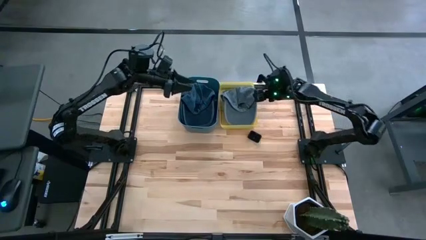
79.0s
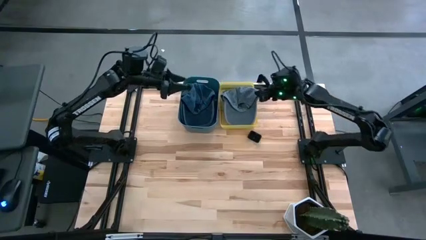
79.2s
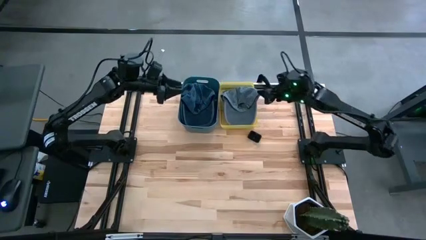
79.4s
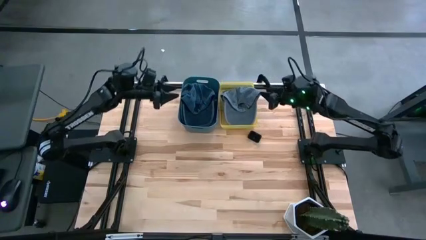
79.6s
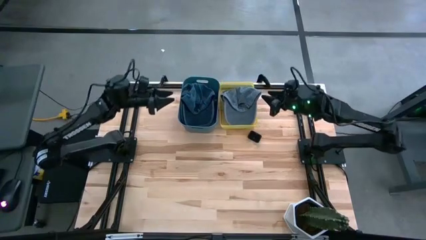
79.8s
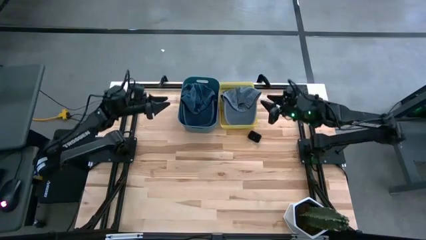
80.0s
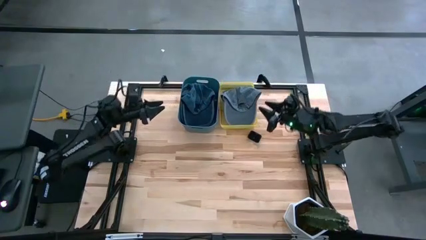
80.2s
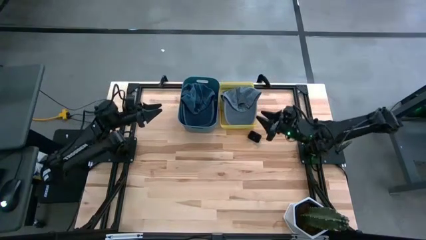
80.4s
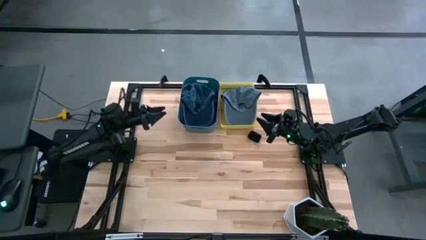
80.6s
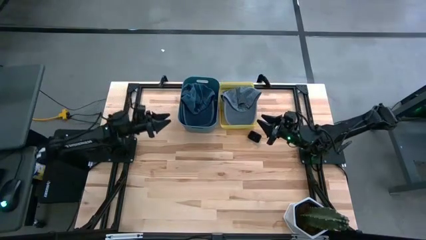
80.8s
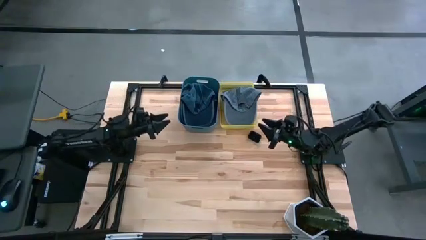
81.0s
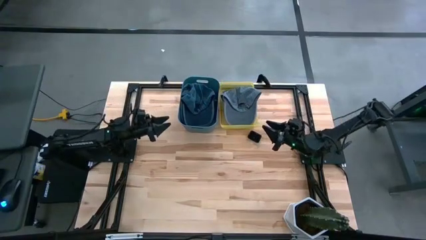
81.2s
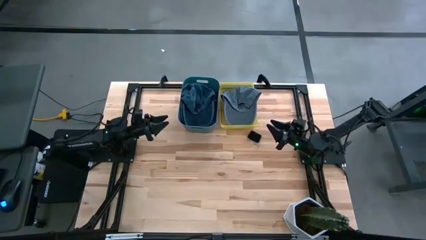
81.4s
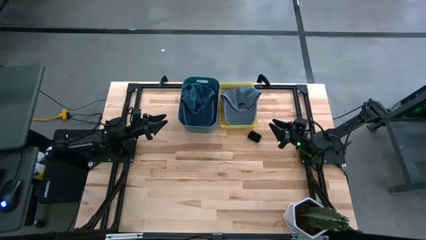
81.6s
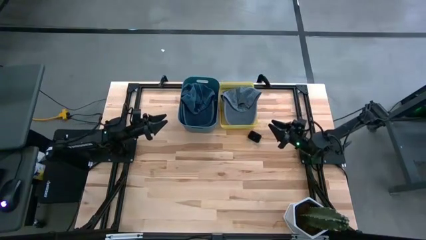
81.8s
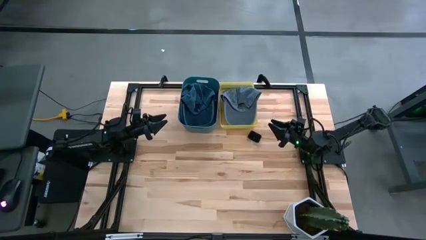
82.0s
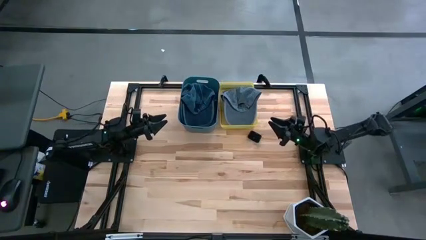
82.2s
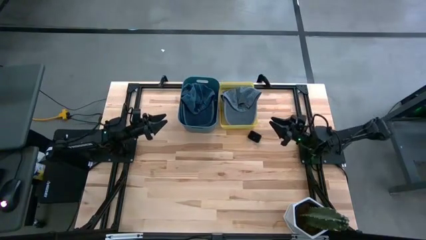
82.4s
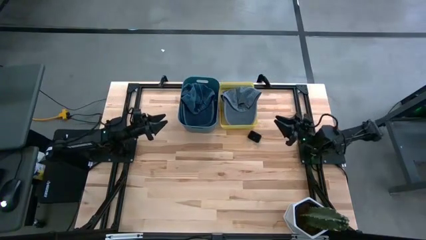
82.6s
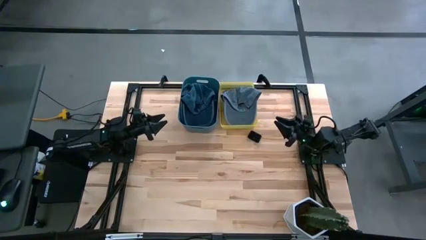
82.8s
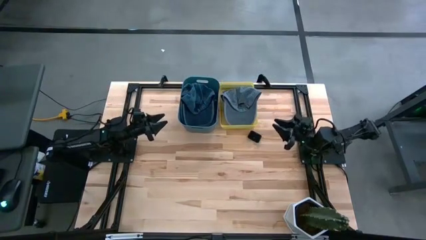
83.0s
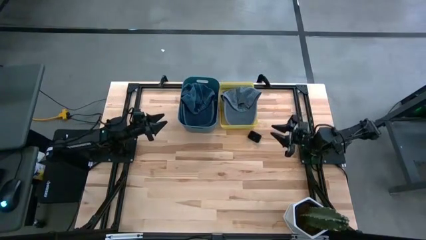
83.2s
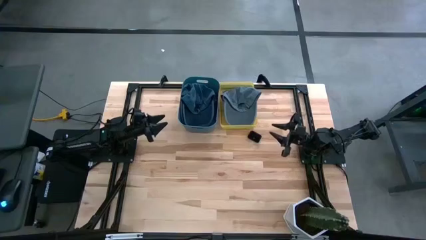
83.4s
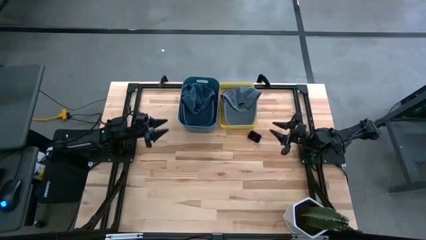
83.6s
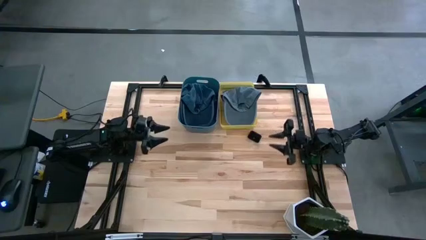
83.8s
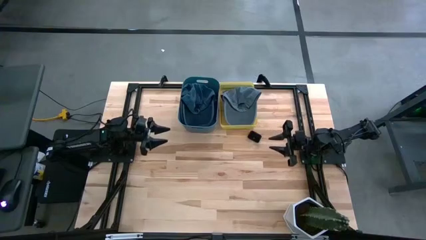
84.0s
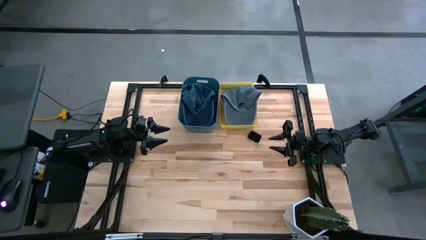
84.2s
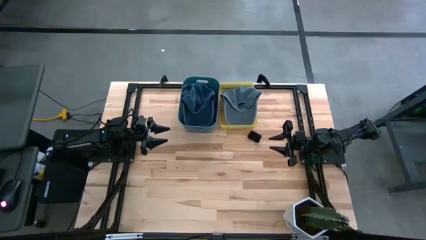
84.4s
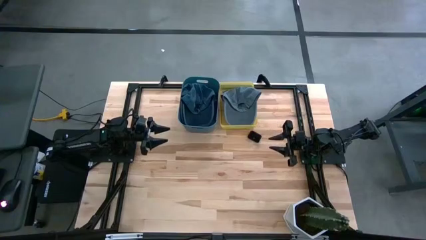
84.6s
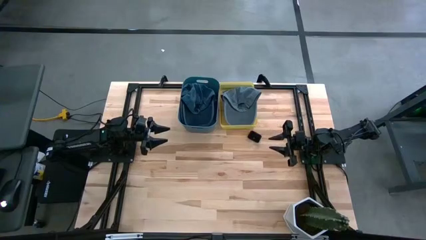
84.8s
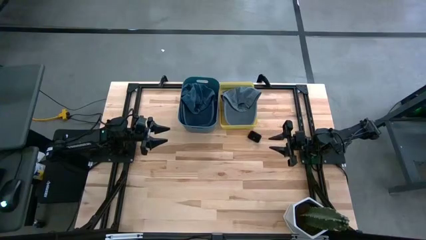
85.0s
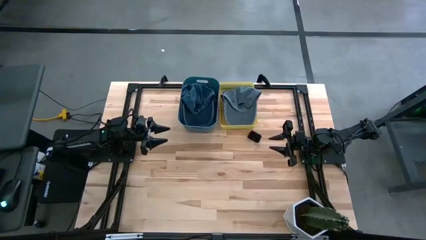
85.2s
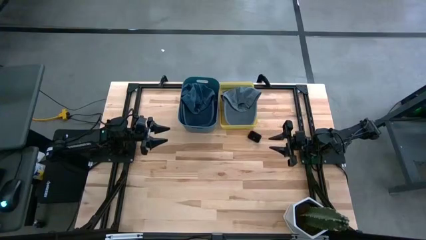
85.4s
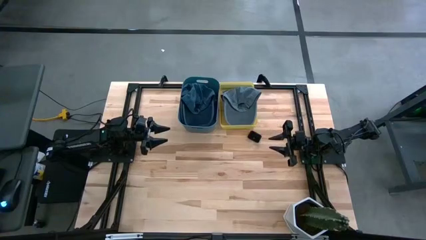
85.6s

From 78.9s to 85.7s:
Task: Pick & Place hat
Return to Home Position

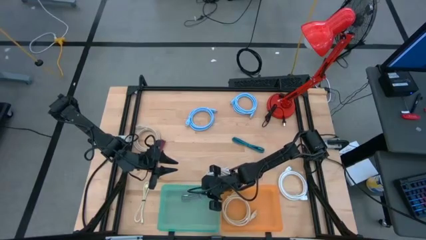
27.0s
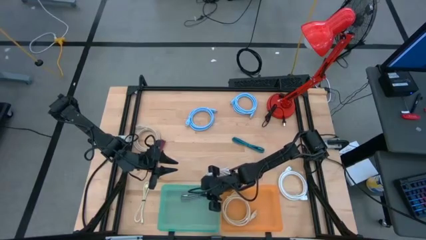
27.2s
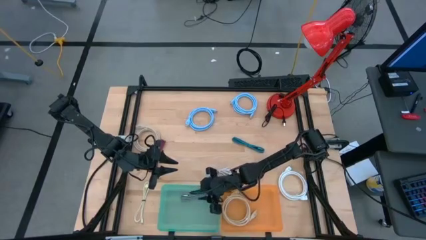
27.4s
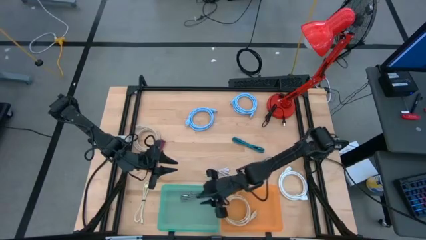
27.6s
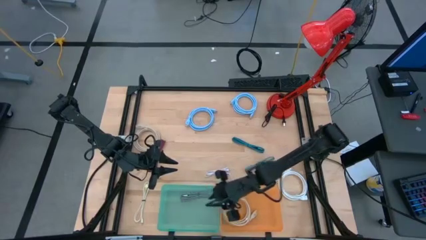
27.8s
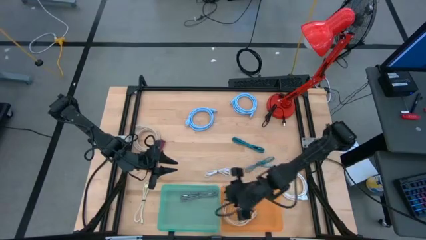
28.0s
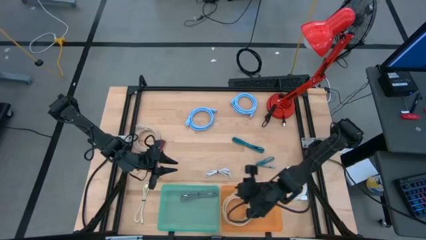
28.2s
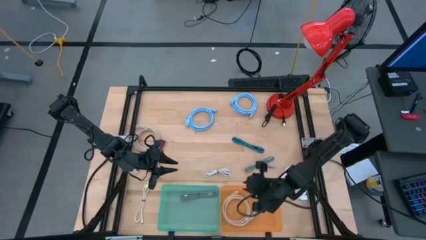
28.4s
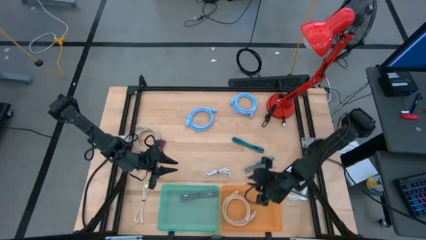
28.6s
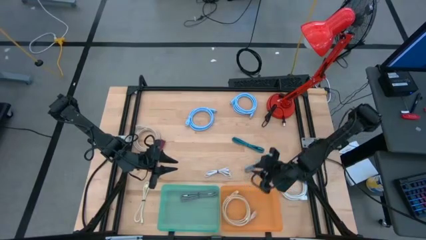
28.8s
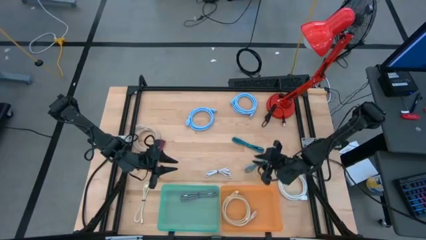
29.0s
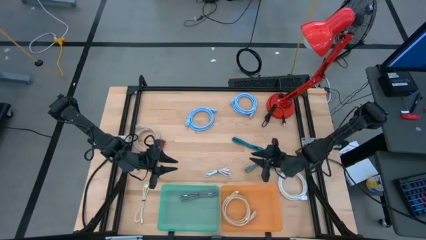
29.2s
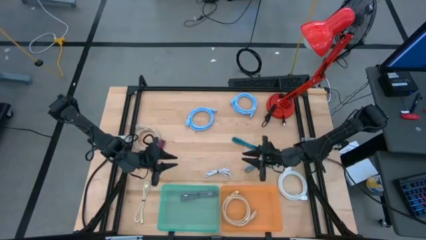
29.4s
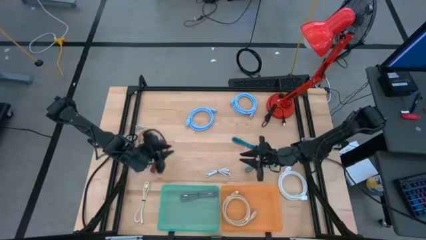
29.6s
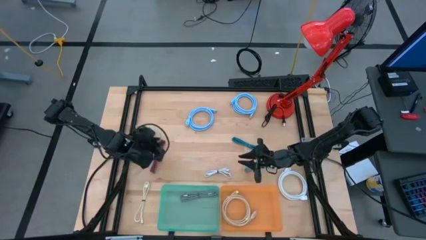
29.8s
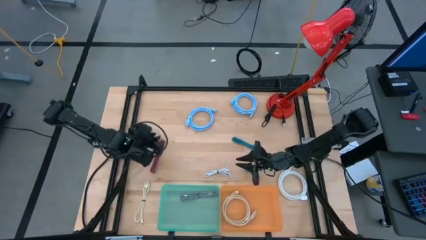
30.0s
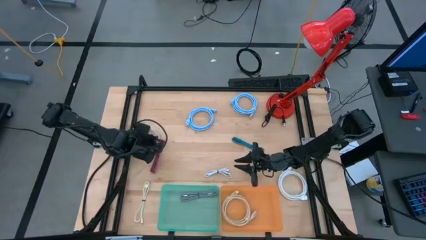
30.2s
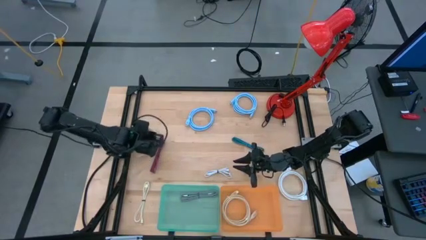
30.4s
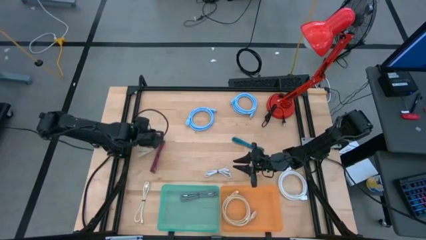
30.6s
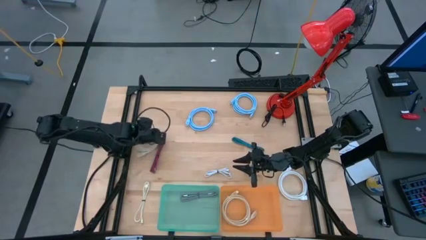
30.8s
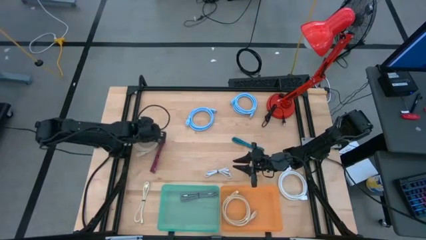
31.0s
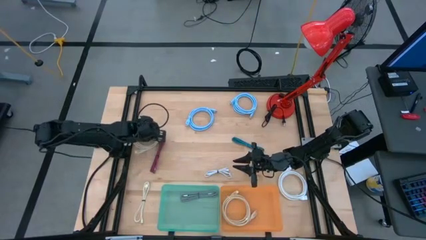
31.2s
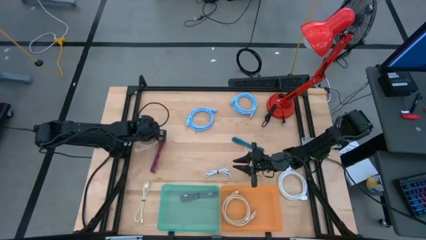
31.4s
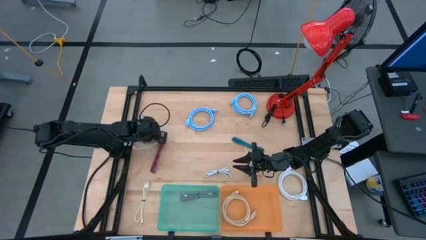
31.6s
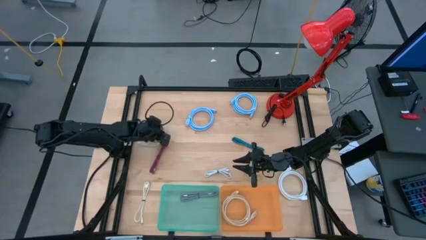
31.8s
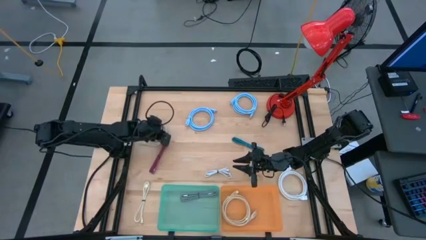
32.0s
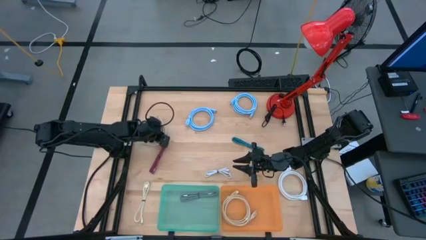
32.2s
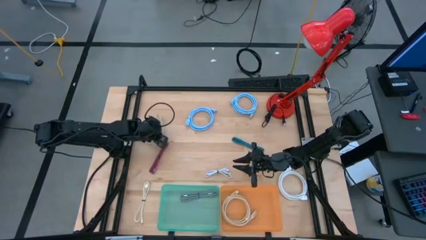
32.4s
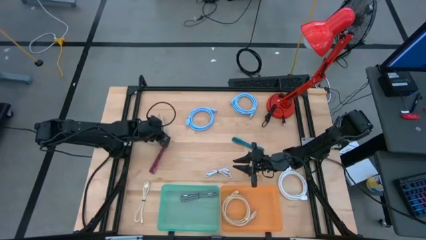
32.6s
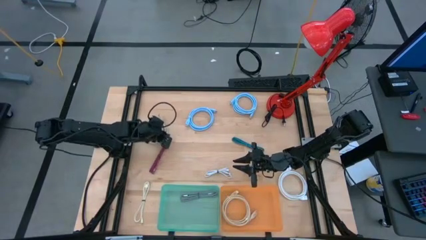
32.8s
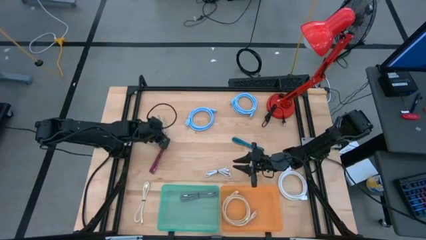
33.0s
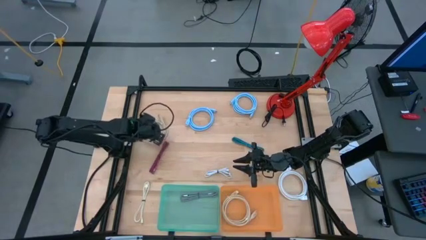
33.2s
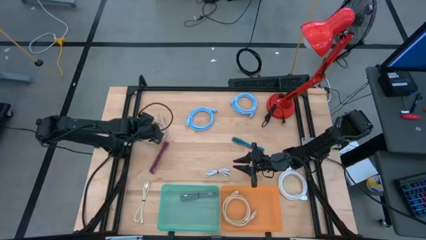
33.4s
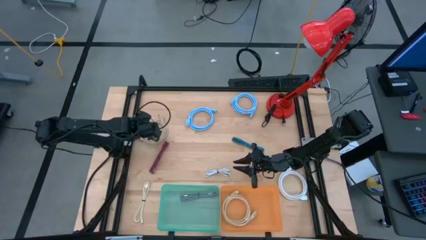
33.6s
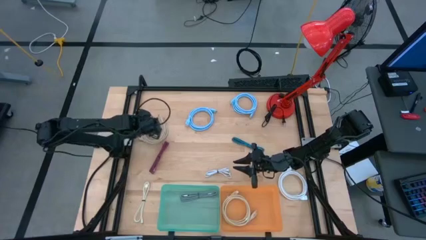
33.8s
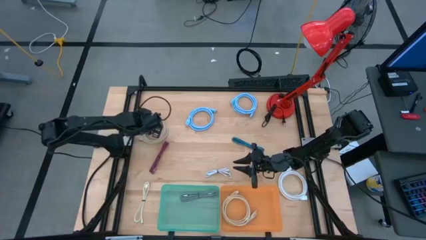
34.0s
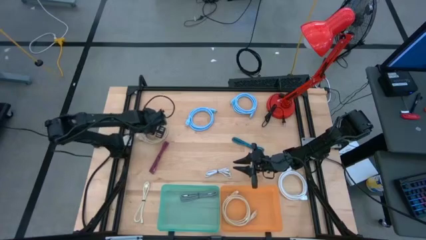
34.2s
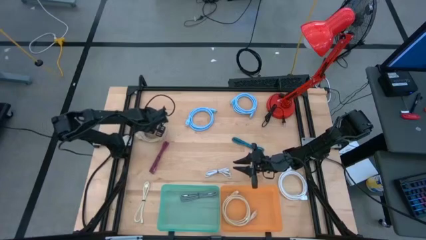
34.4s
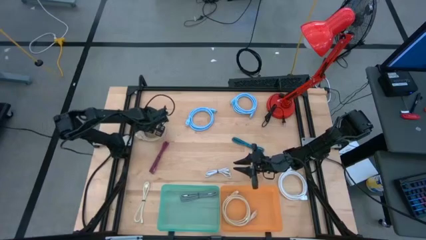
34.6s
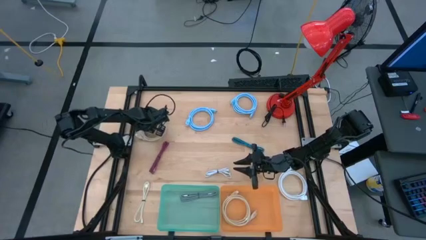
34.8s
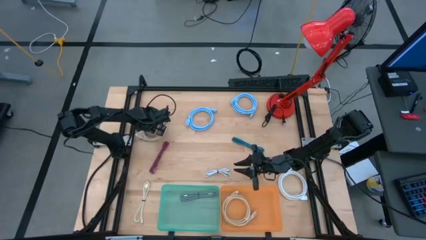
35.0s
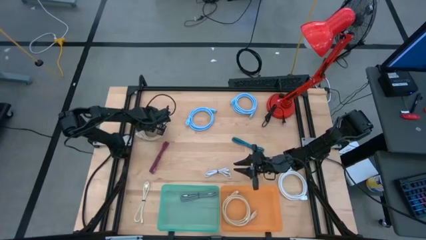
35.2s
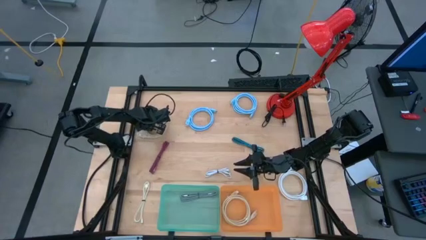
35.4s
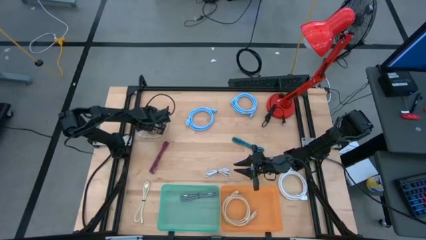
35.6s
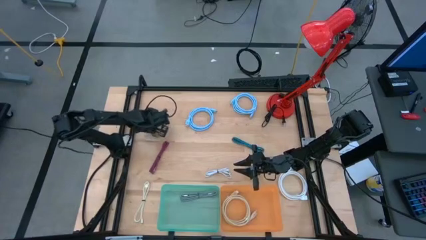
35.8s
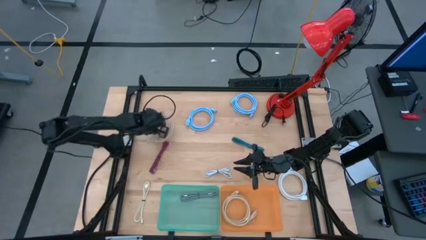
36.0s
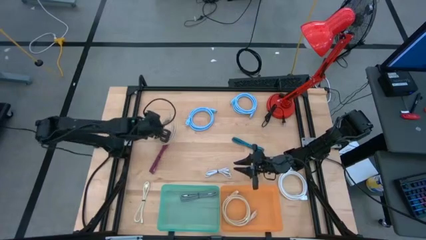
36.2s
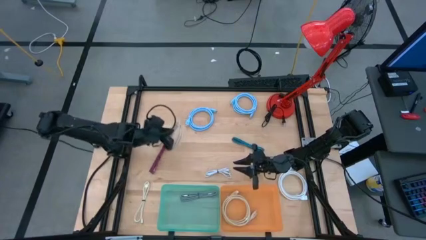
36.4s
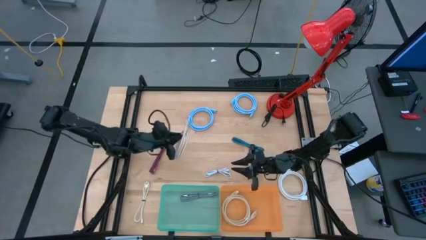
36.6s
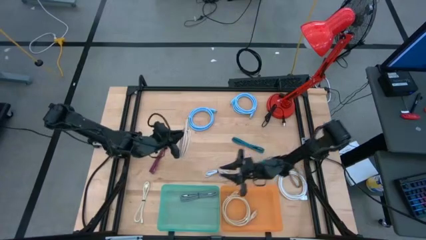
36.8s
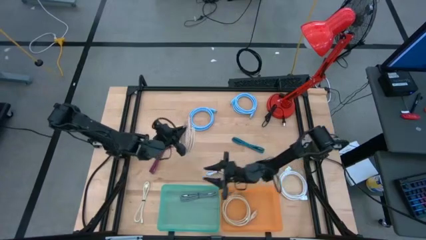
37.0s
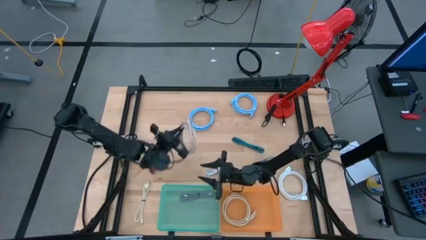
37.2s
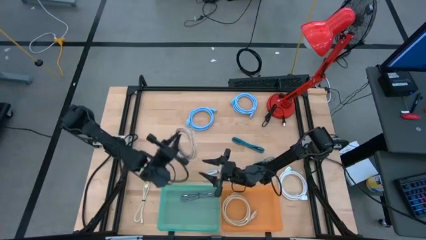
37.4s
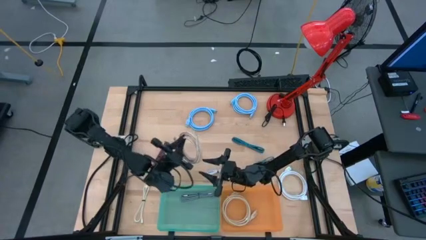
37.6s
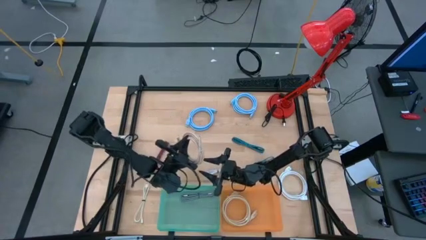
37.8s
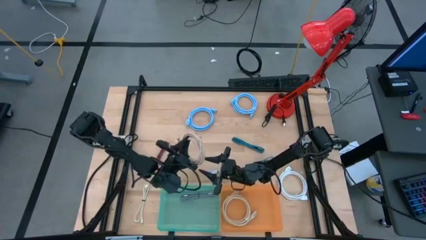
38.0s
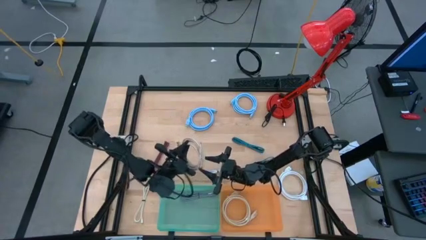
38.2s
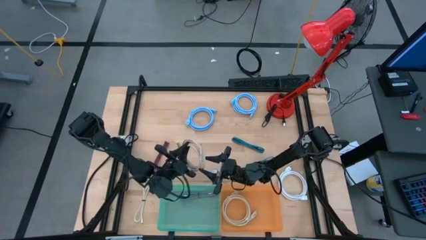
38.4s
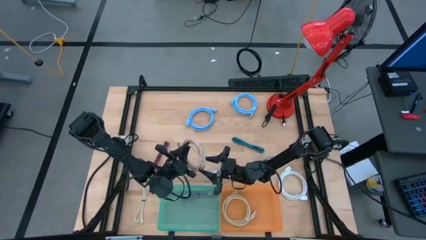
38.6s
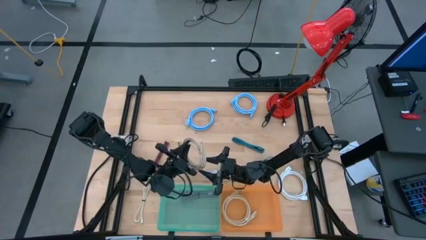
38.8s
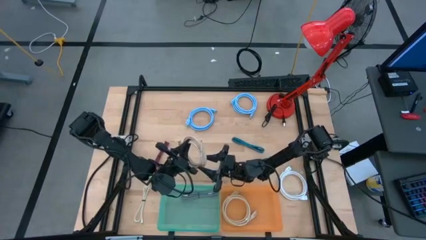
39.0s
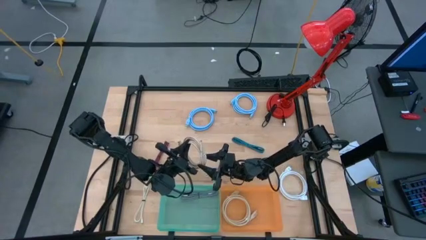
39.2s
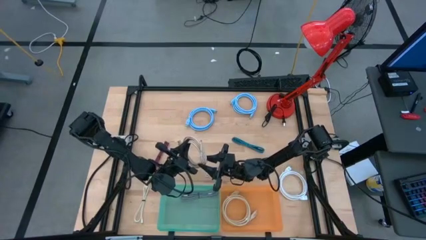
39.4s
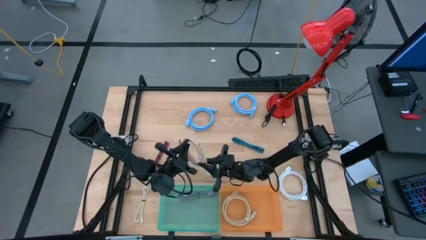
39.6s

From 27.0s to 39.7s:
Task: Pick & Place USB Port
Put the light brown HDMI cable into the orange bin
